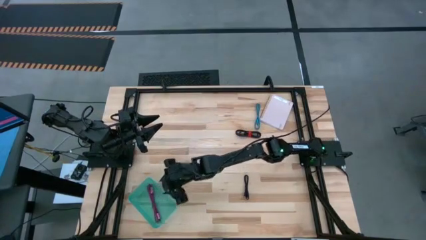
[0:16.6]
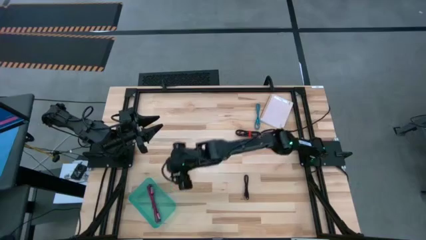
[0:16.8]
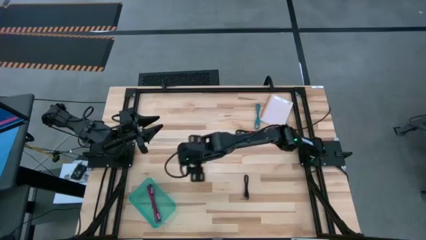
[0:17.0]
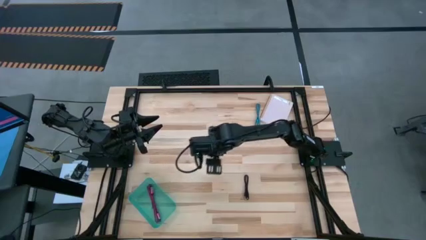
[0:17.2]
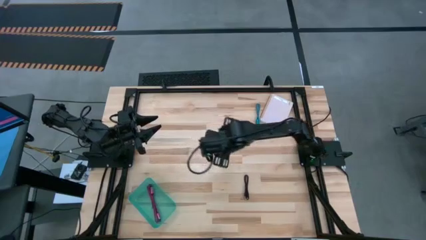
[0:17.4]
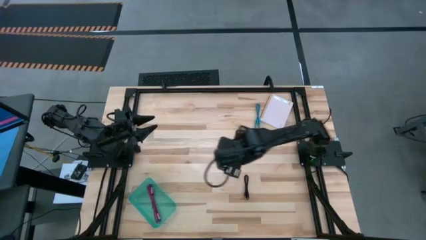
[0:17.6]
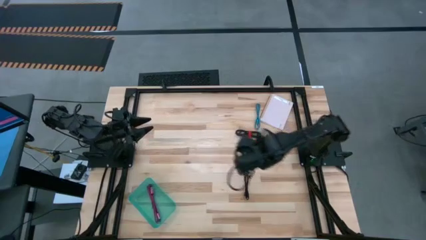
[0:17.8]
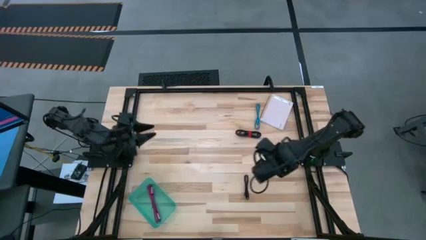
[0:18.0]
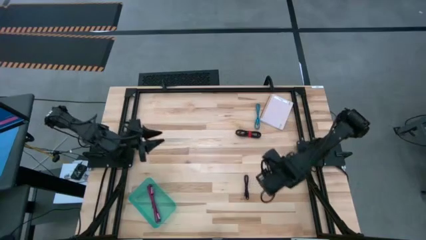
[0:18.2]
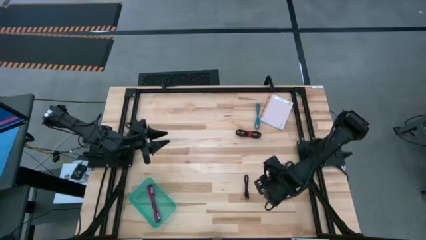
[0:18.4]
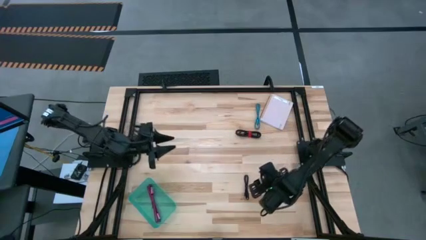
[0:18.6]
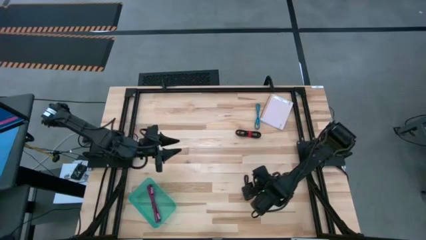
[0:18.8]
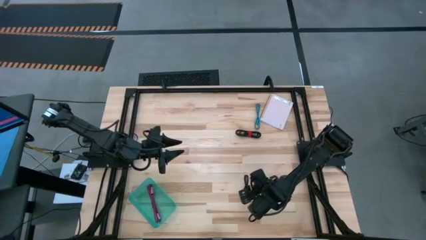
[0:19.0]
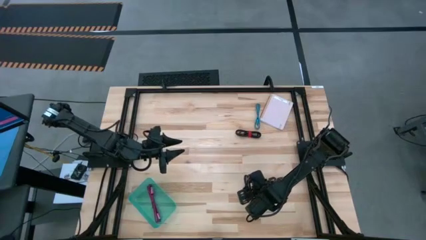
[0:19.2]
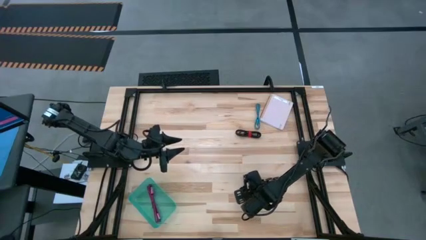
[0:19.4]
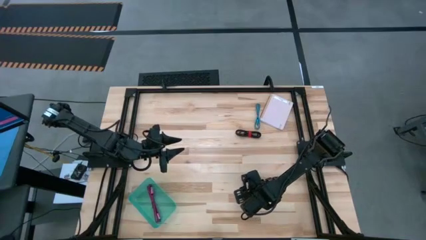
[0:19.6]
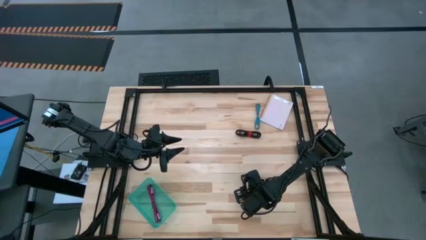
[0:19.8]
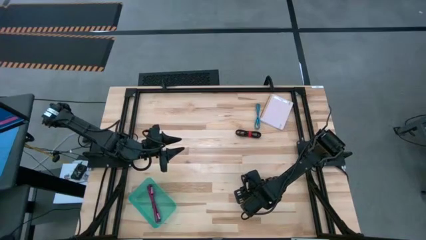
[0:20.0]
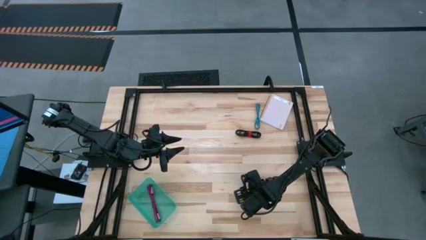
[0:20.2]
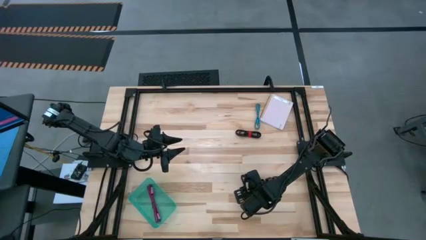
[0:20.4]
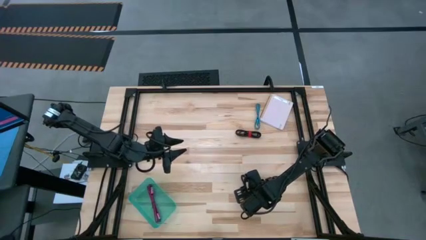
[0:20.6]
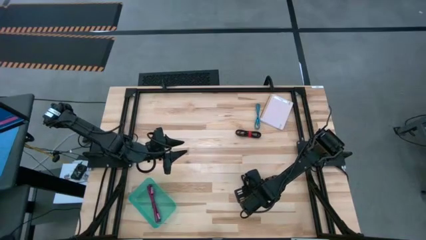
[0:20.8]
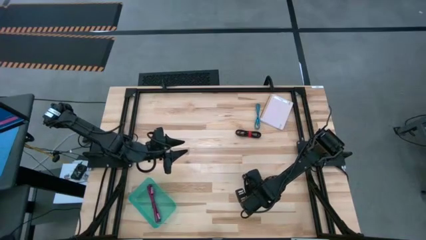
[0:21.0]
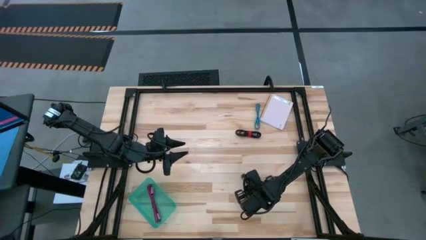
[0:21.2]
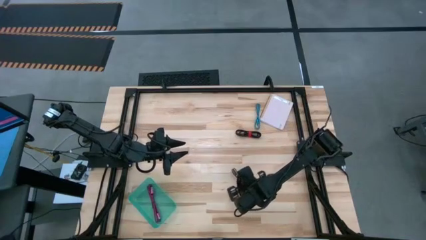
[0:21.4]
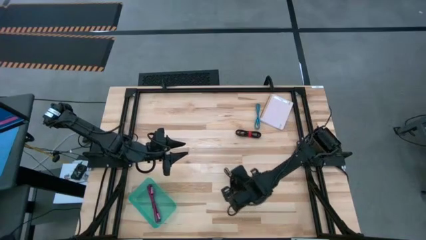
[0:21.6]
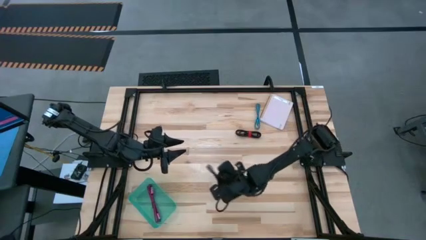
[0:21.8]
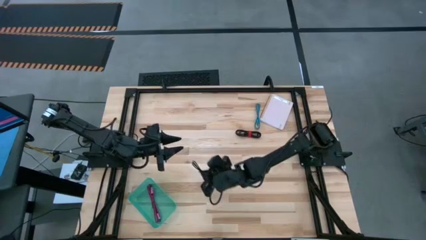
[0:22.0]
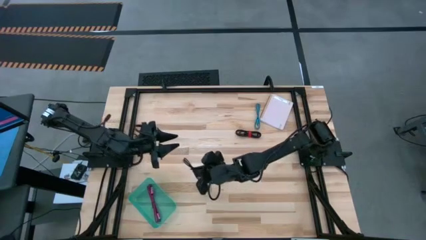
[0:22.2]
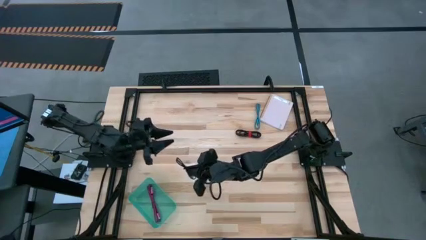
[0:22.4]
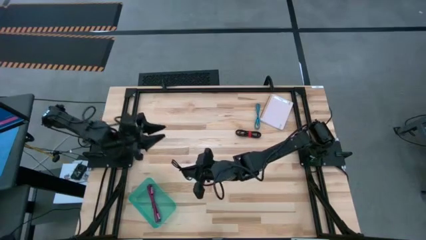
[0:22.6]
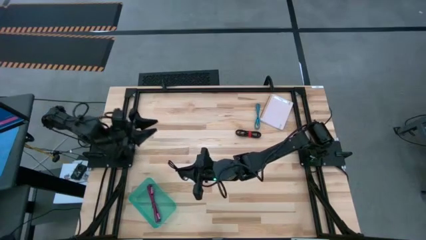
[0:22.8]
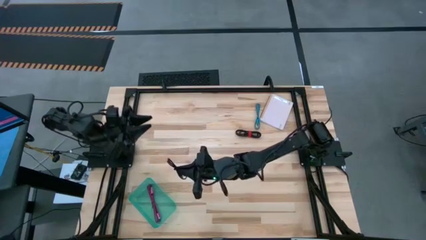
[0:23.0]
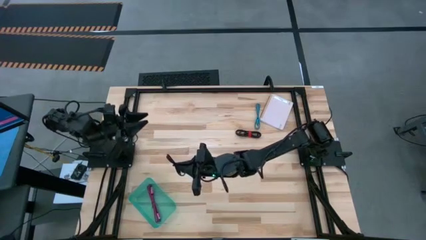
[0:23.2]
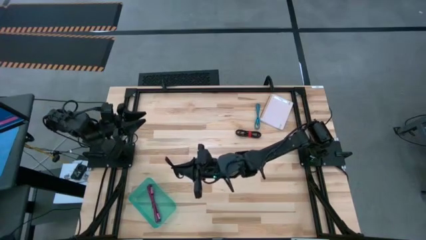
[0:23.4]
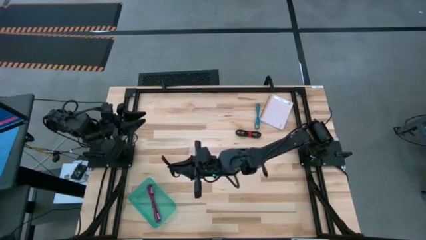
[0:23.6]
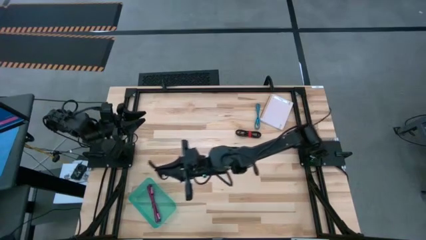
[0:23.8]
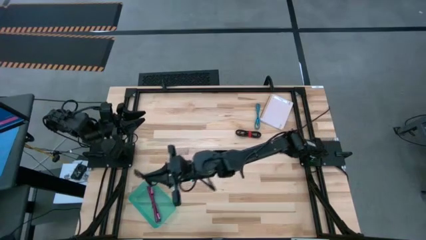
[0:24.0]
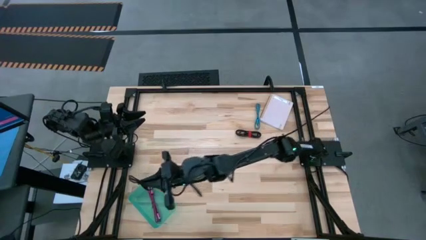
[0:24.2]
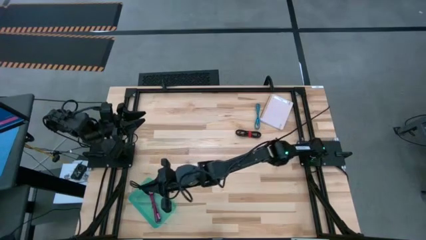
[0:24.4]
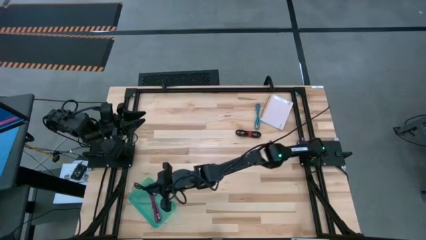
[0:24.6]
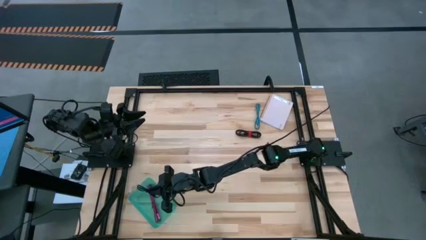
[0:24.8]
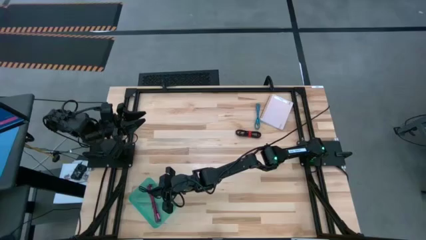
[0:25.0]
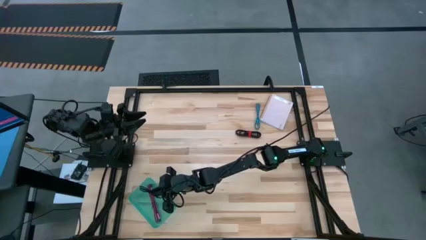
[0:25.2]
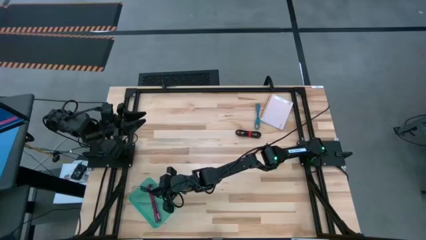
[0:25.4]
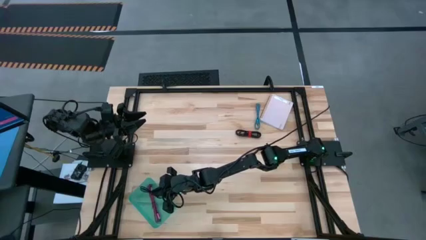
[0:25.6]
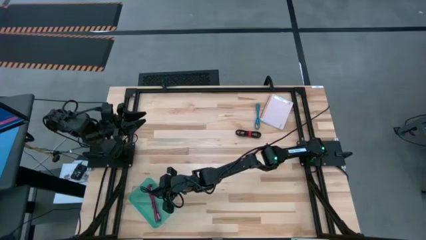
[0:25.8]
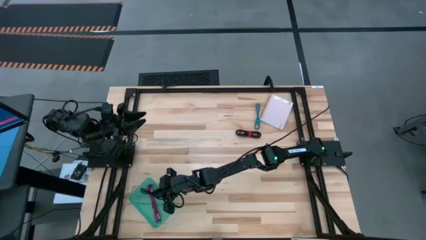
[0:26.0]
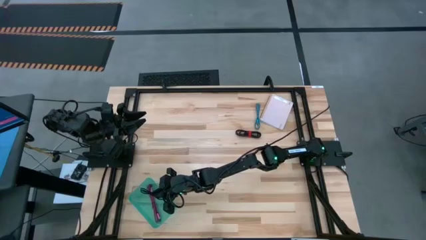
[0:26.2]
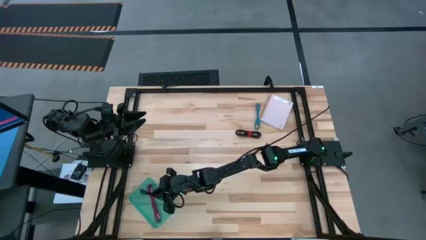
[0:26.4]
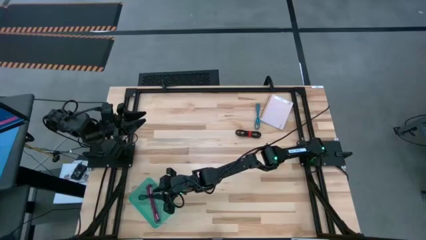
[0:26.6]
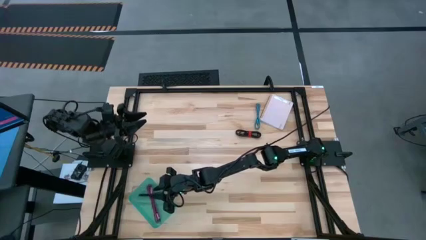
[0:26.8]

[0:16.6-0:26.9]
Task: Pick and place USB-C Cables
Put the bottom black USB cable into the green bin
